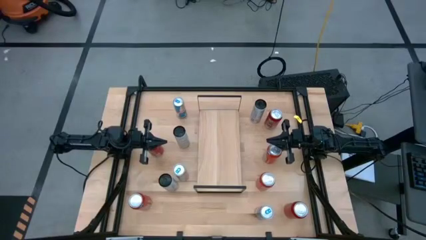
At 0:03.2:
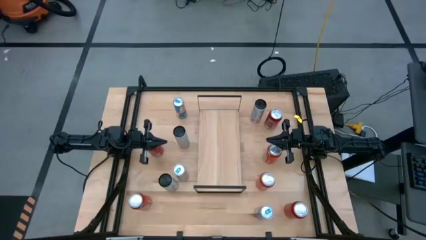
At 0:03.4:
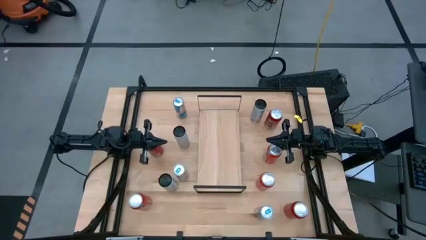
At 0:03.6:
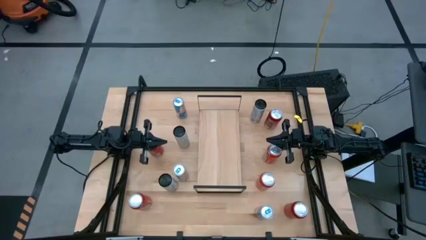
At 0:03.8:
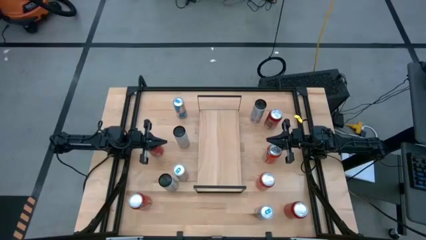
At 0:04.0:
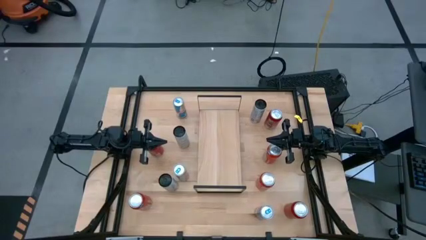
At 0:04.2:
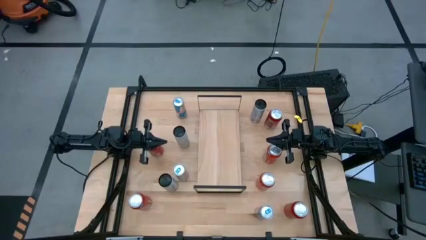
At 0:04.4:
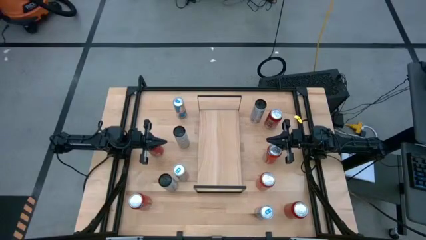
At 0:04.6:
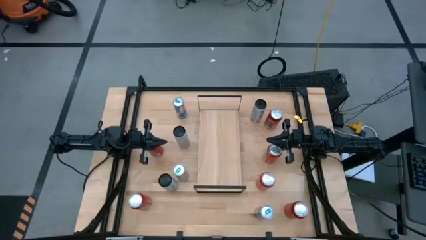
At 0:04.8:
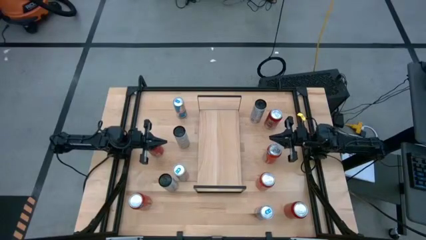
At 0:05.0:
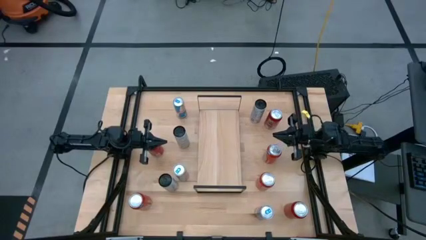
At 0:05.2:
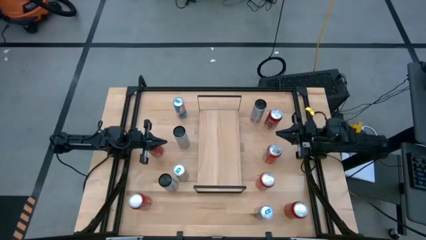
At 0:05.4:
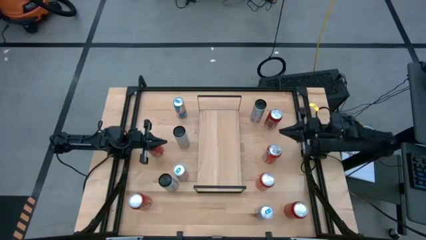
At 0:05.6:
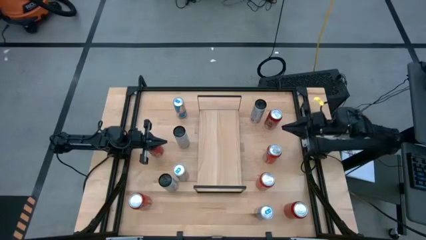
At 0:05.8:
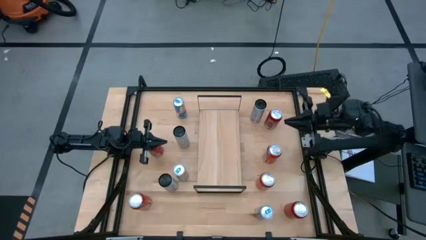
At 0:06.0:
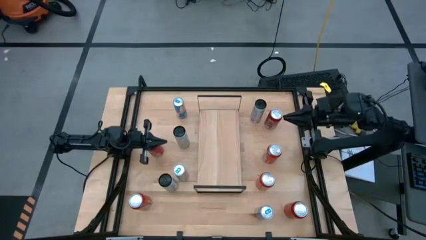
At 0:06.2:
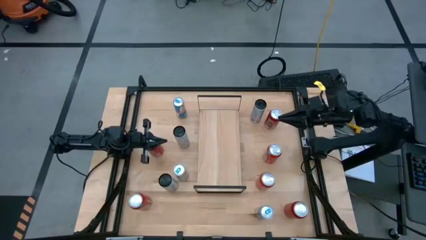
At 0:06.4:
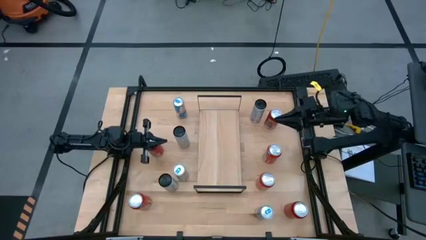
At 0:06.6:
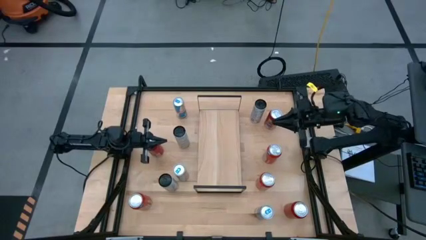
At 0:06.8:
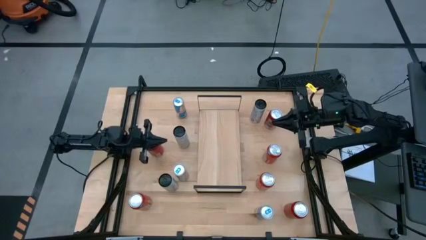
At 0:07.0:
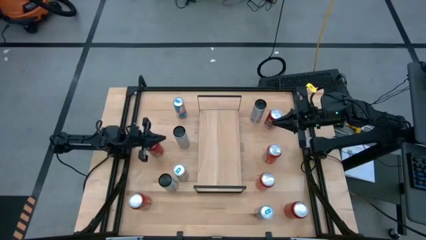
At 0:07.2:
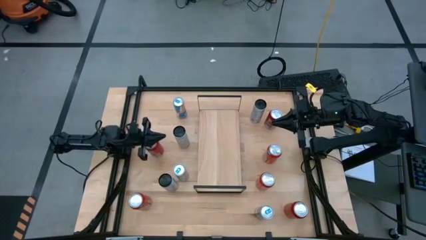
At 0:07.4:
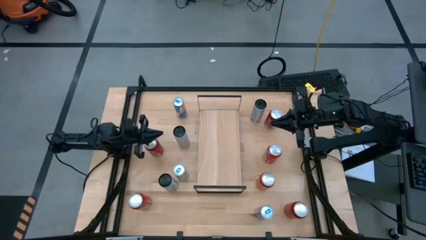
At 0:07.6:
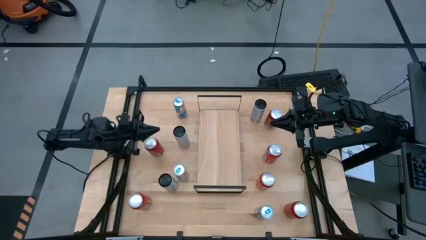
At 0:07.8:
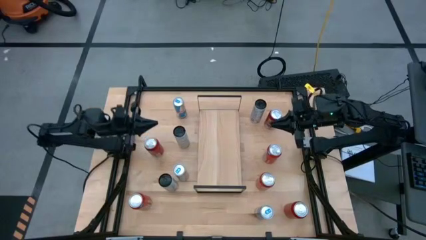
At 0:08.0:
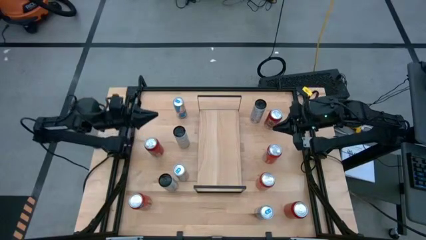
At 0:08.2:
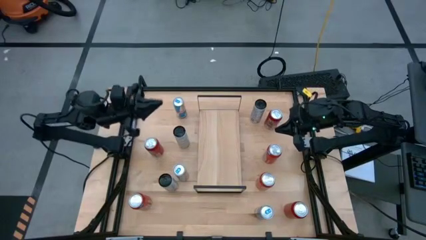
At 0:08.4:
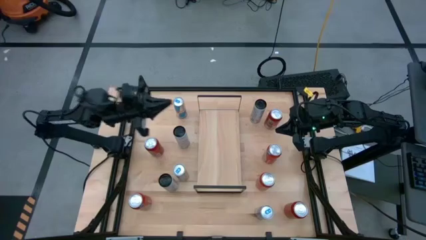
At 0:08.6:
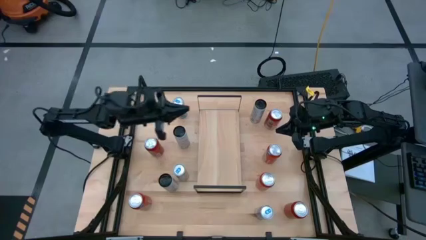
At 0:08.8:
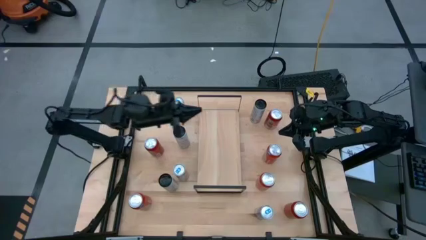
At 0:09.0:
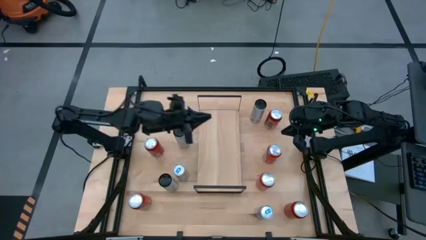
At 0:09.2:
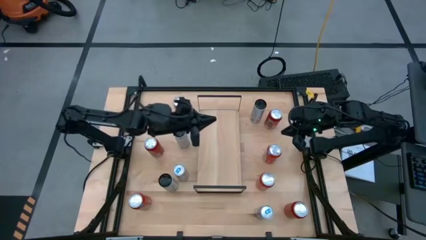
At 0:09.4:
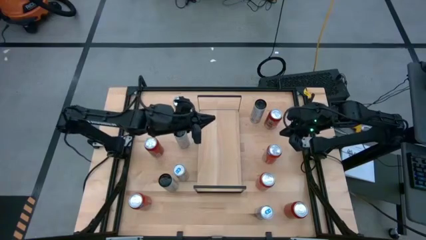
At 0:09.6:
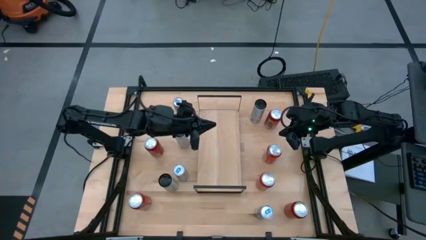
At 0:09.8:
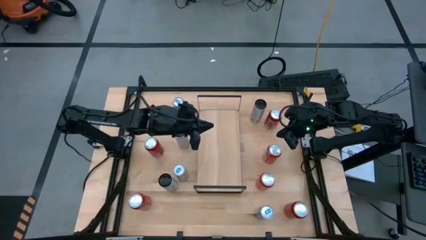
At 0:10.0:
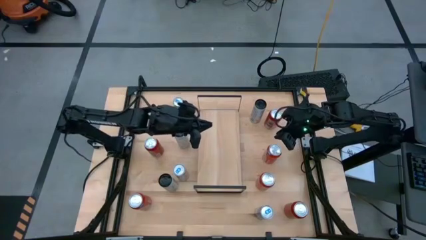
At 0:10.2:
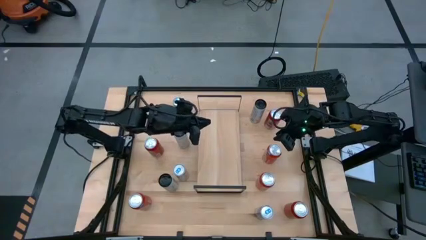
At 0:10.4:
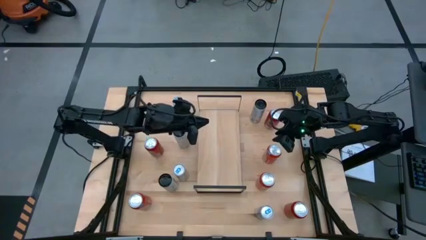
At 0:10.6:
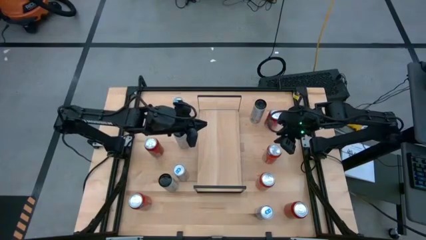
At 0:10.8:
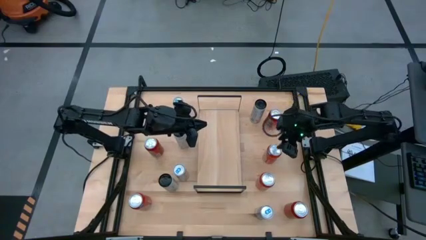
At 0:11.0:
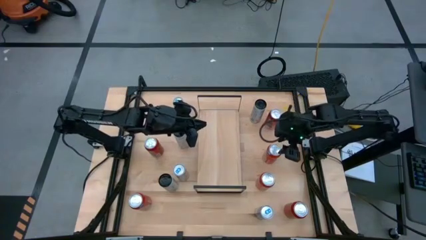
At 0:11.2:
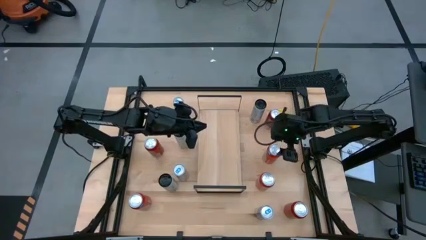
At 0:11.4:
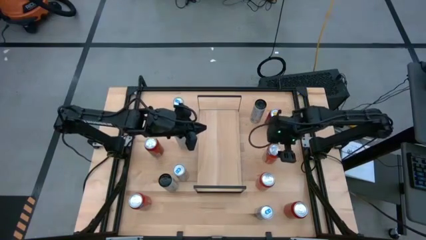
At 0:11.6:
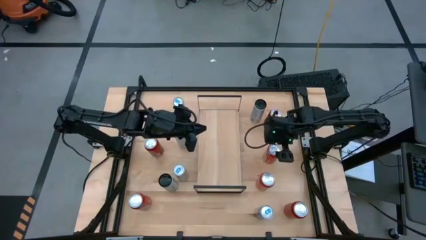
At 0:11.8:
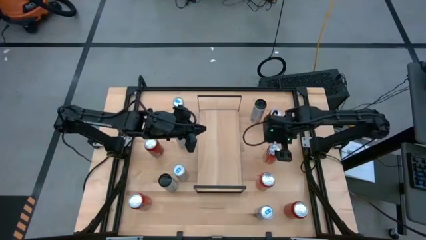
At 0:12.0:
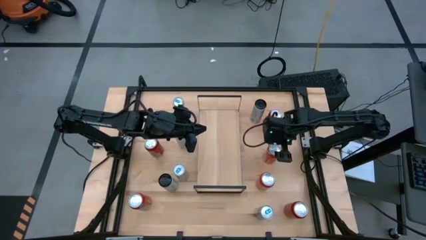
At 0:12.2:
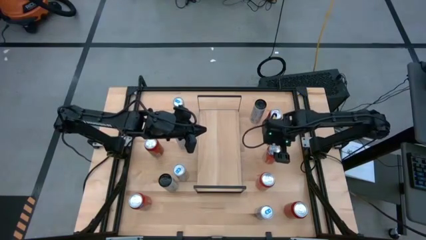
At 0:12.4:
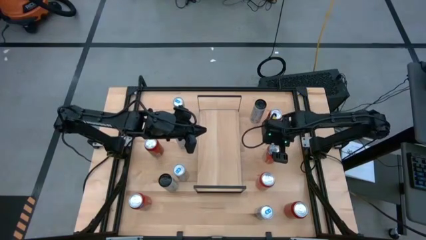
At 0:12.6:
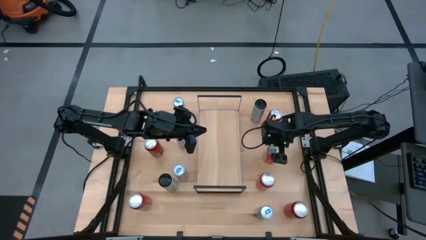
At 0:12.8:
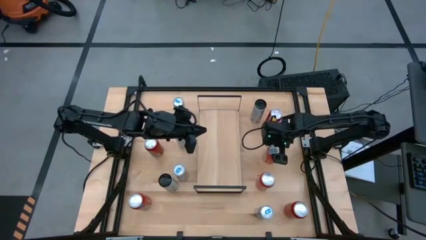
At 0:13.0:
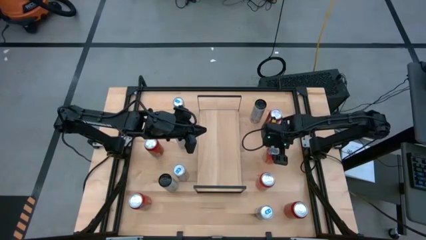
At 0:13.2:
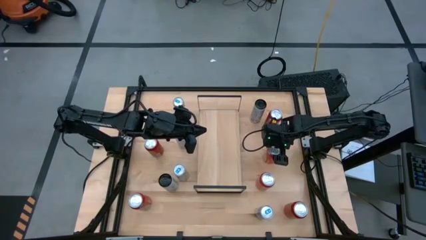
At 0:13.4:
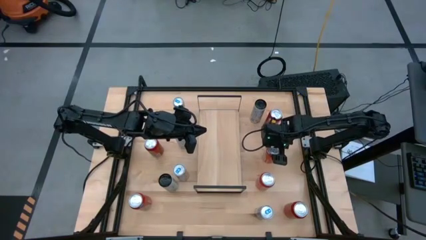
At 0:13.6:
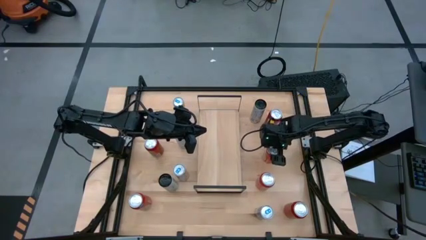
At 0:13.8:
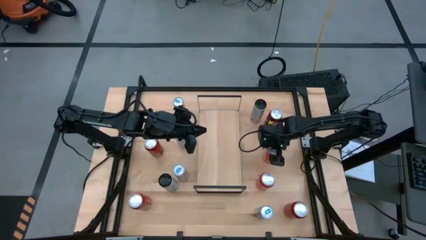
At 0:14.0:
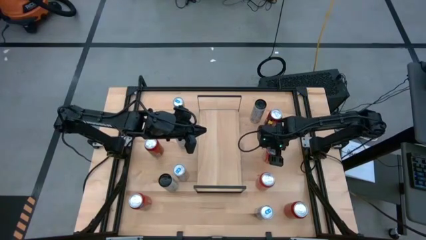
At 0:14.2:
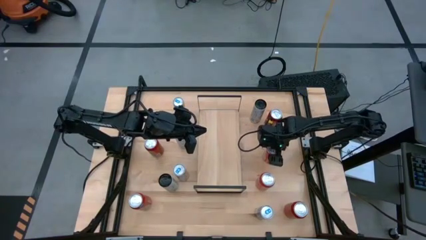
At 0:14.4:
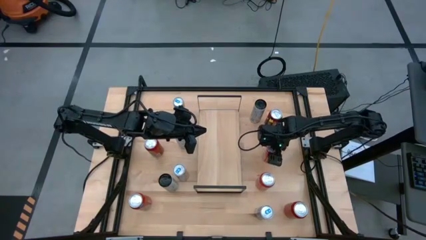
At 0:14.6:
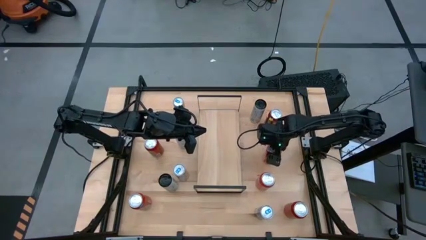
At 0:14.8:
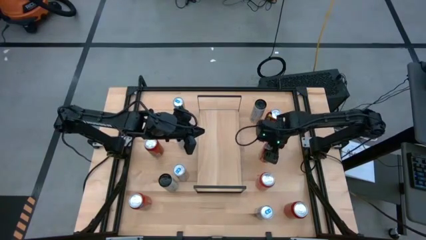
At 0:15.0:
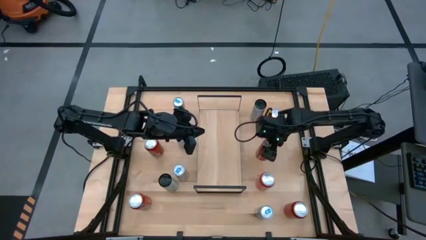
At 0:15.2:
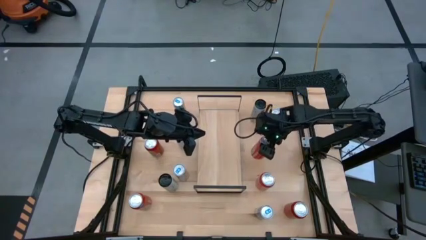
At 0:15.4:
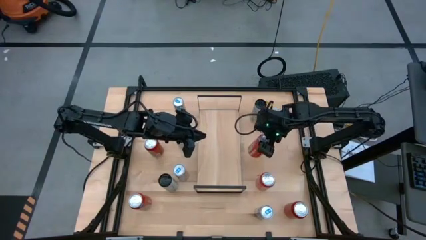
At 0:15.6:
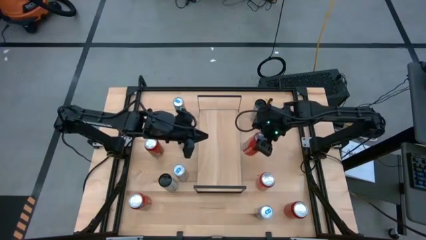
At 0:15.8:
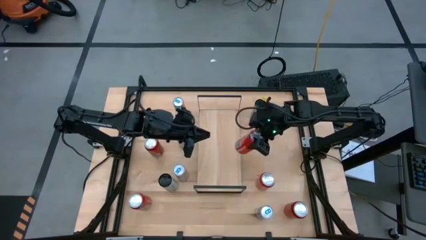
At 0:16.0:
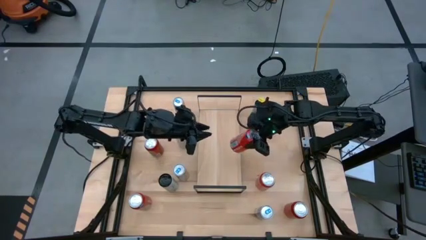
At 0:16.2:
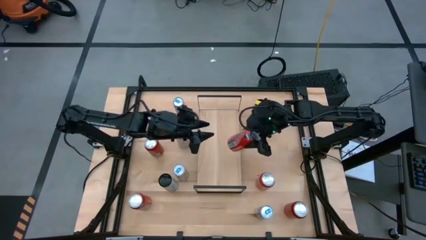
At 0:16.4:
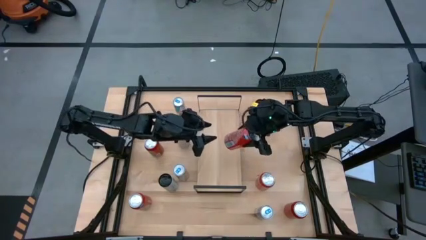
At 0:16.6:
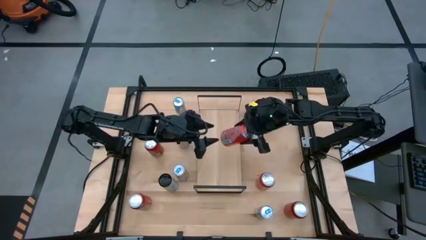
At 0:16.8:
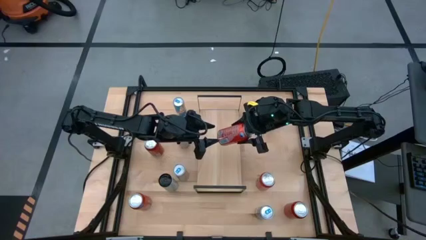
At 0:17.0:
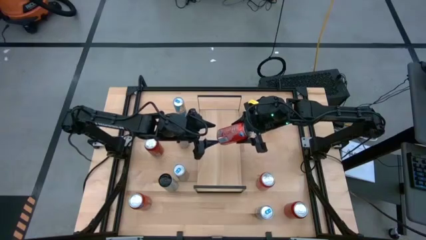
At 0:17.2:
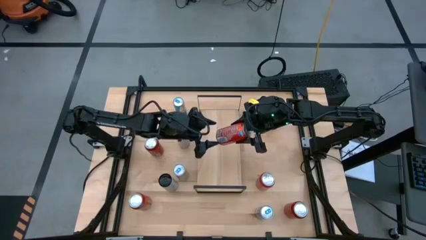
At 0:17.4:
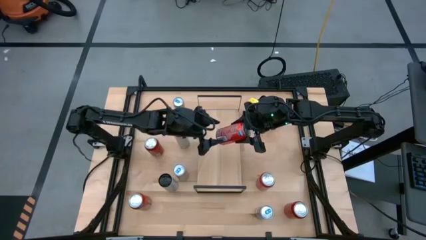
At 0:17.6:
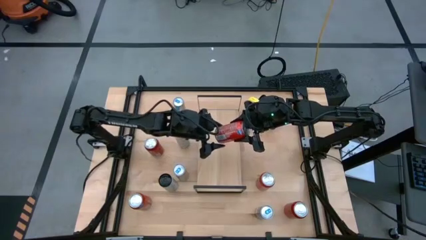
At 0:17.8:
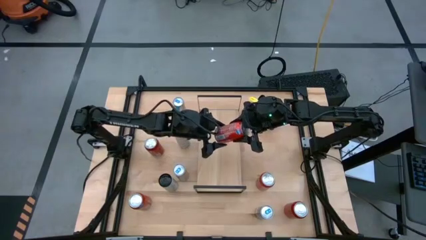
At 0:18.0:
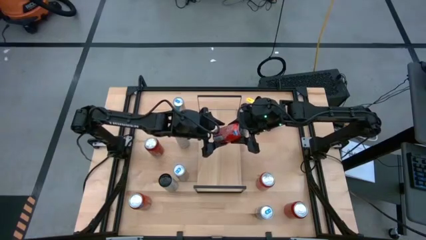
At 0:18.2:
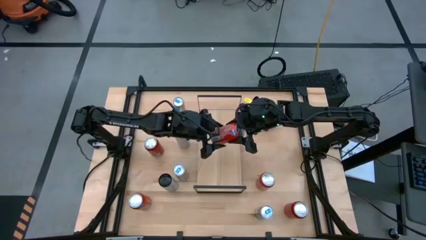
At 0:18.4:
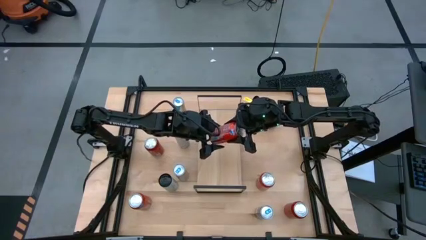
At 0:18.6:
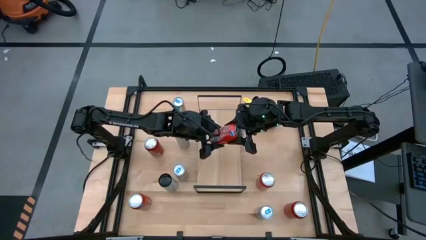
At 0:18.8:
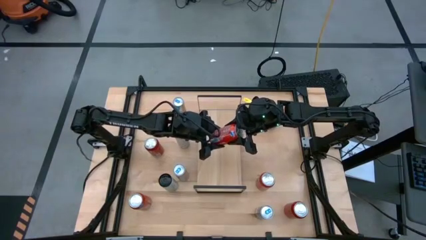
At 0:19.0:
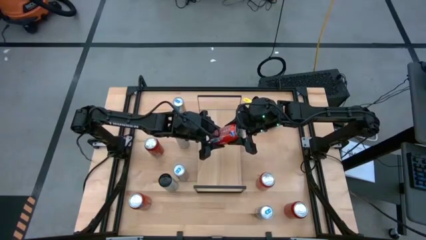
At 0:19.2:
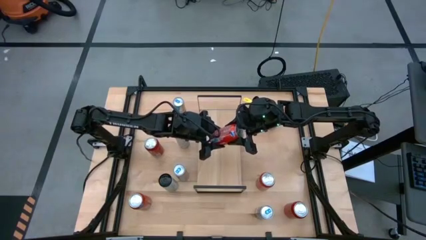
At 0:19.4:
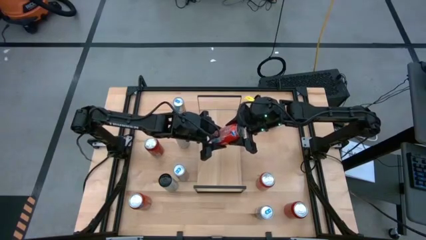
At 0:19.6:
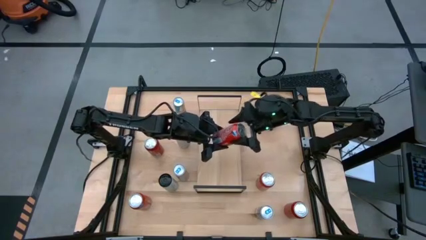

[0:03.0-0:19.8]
Task: Place canned beverage on shelf
Put the top right orange soda can on the shelf
